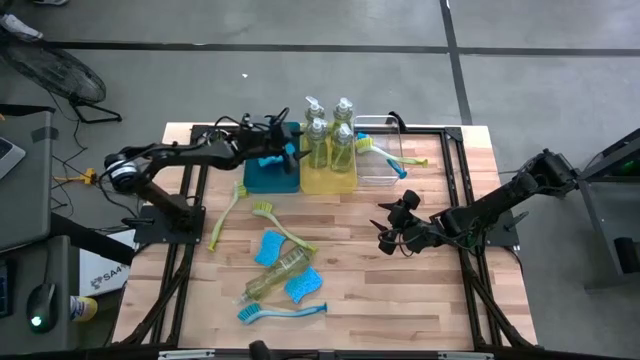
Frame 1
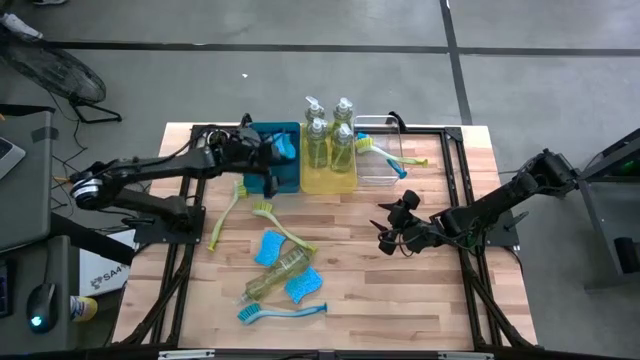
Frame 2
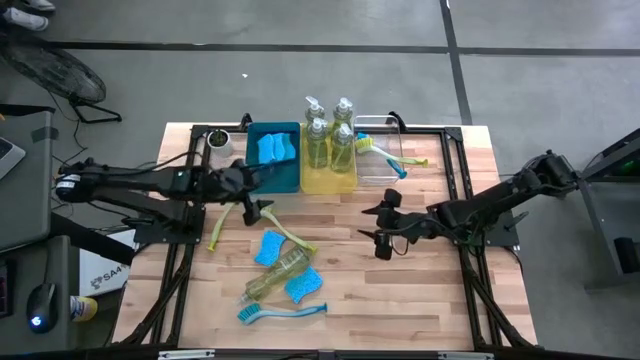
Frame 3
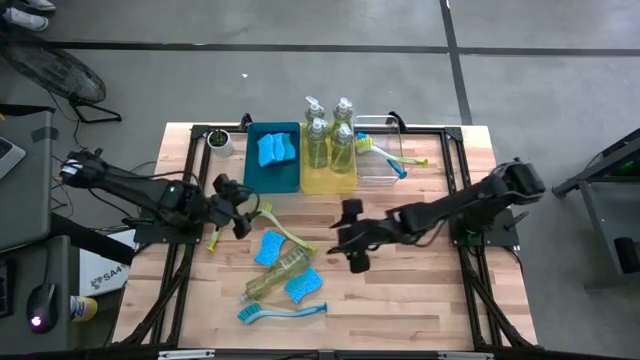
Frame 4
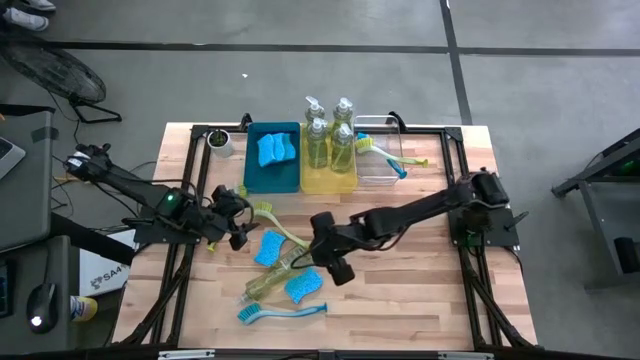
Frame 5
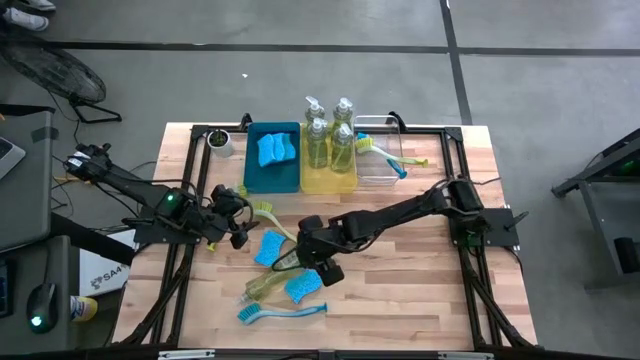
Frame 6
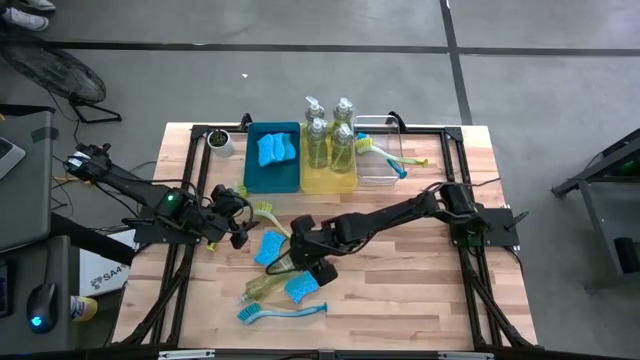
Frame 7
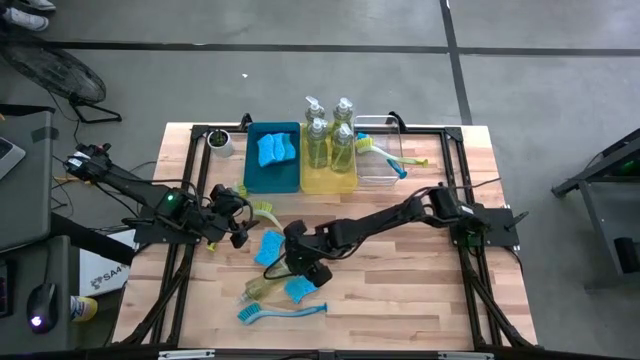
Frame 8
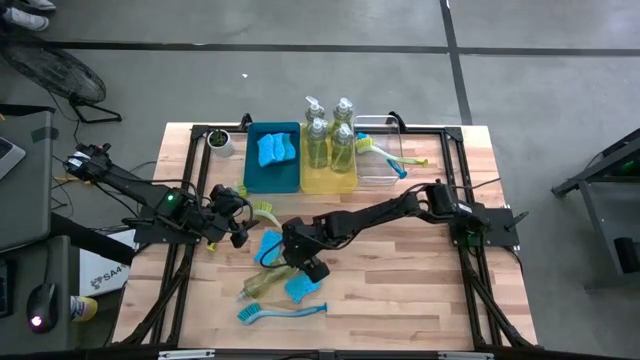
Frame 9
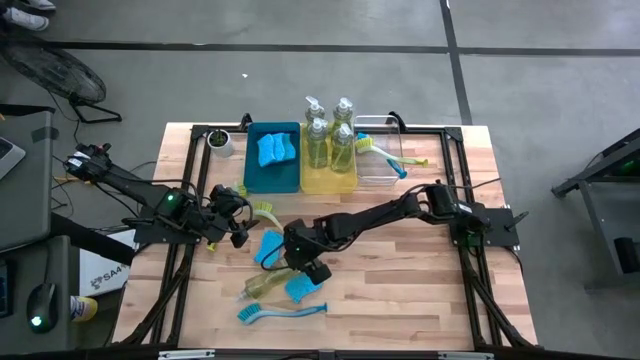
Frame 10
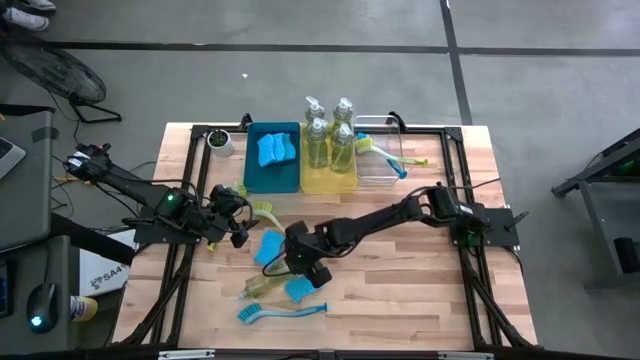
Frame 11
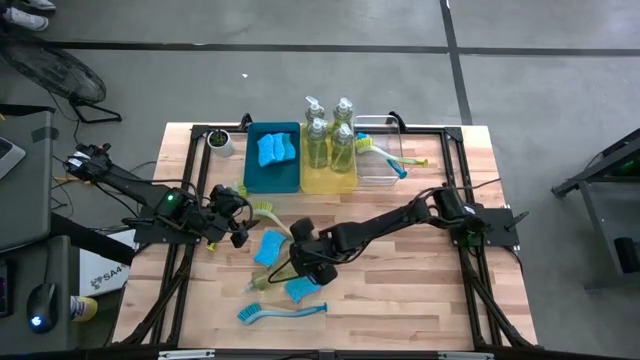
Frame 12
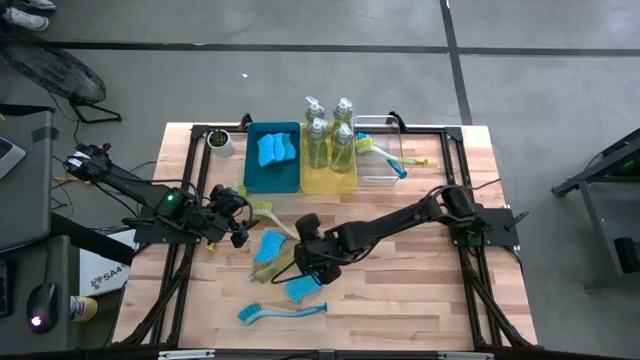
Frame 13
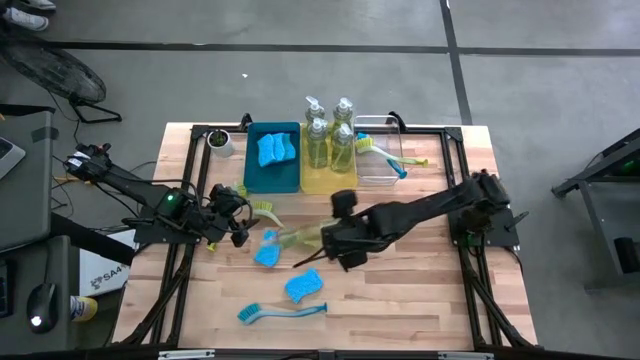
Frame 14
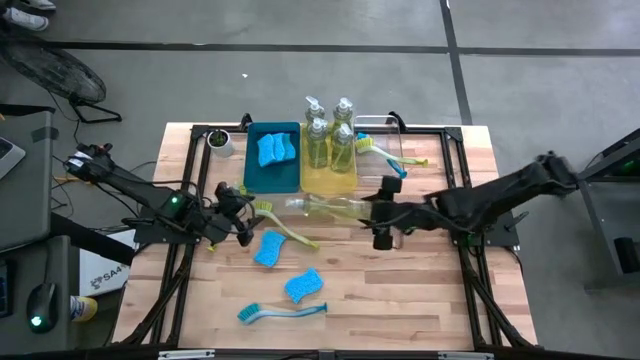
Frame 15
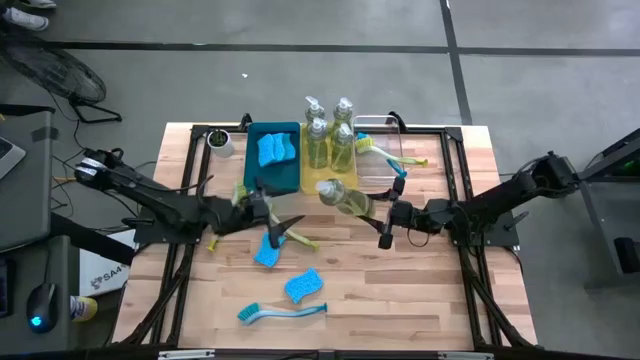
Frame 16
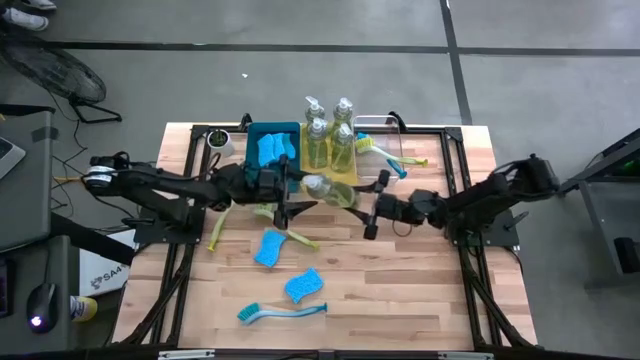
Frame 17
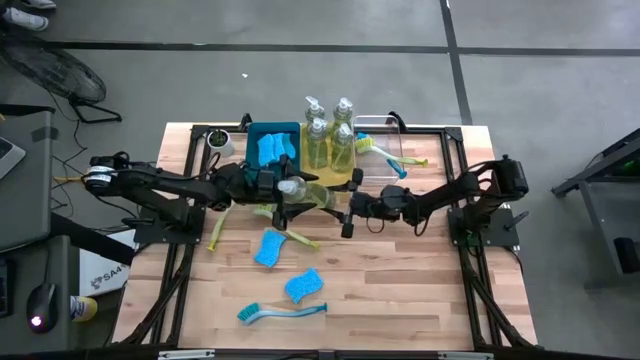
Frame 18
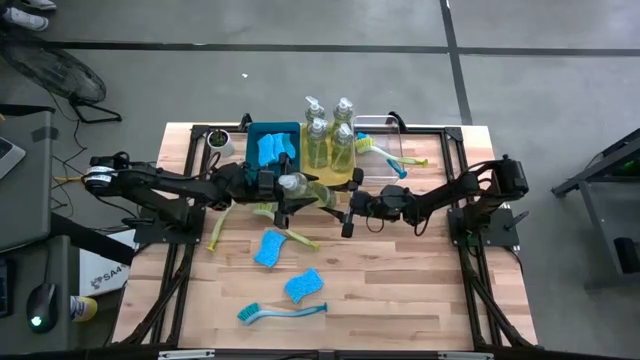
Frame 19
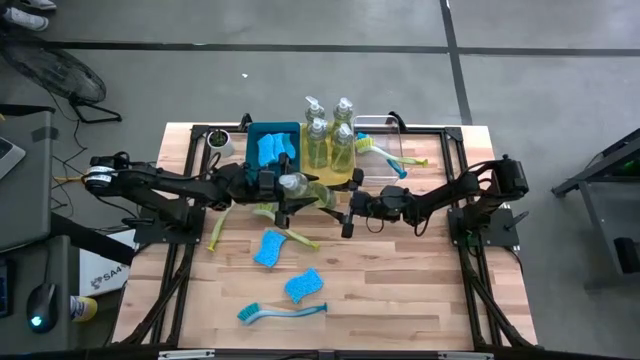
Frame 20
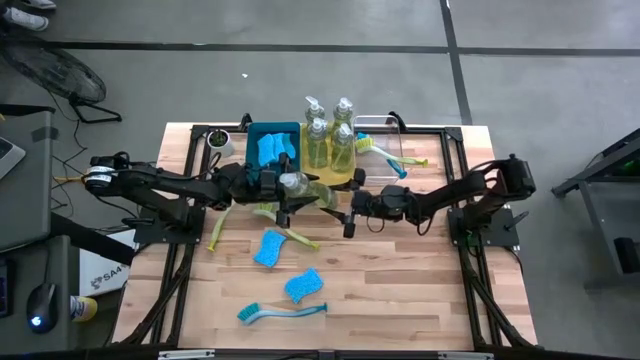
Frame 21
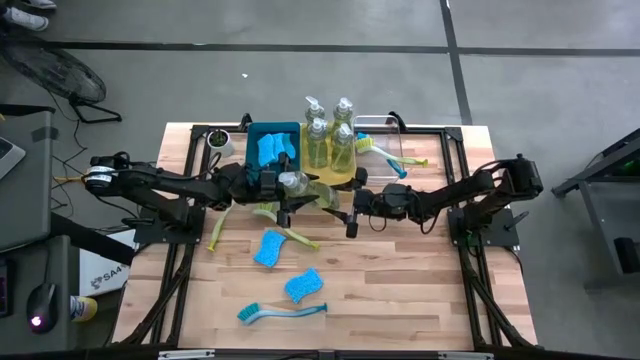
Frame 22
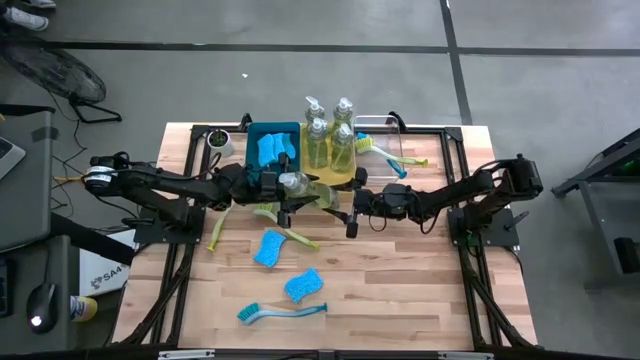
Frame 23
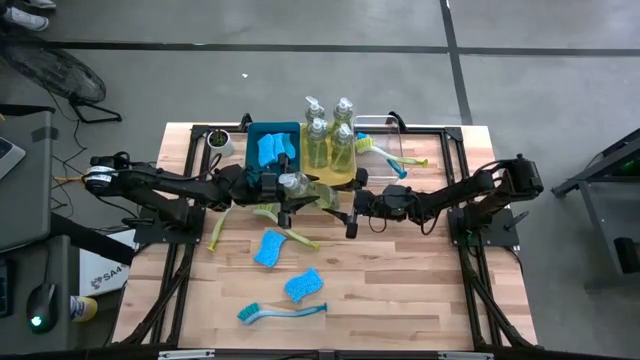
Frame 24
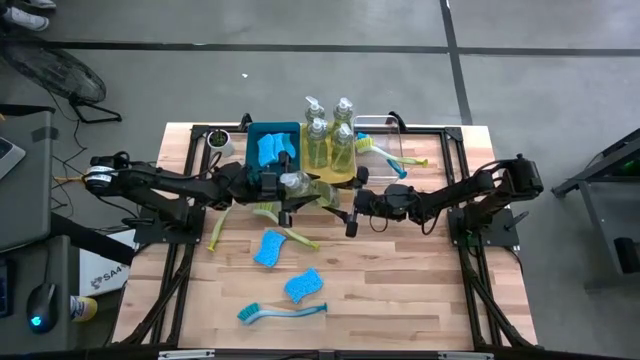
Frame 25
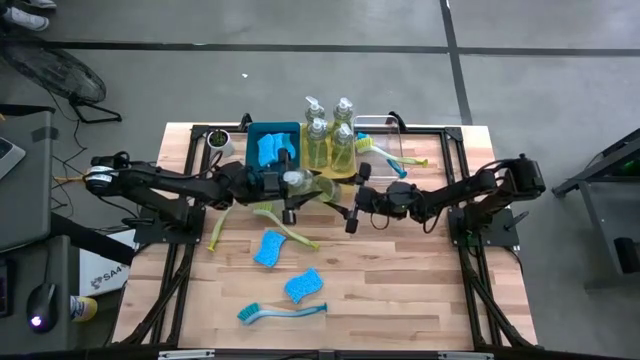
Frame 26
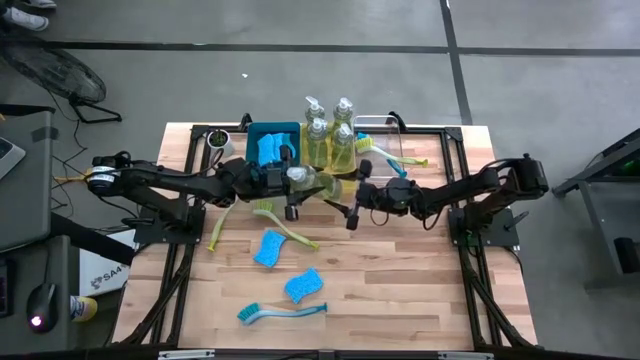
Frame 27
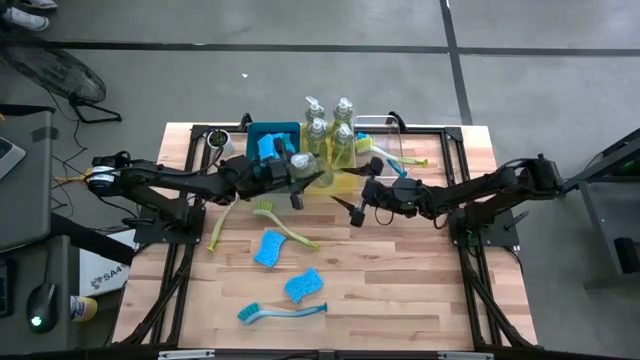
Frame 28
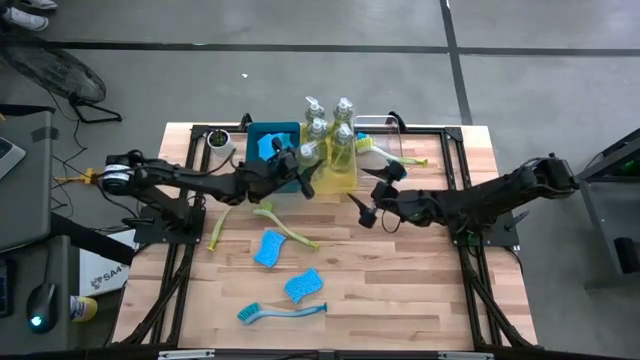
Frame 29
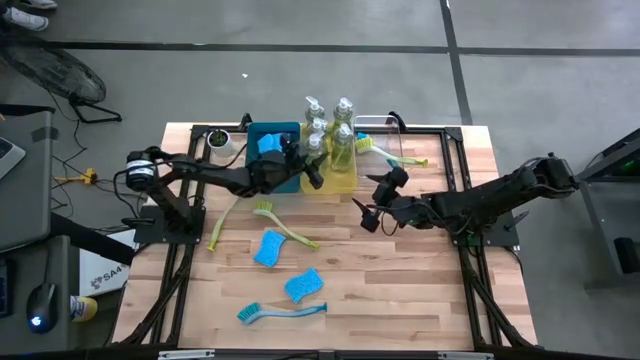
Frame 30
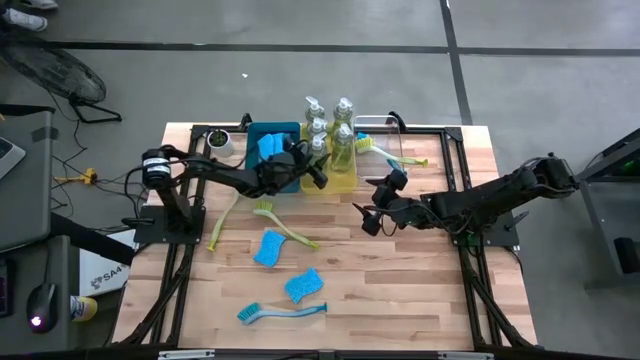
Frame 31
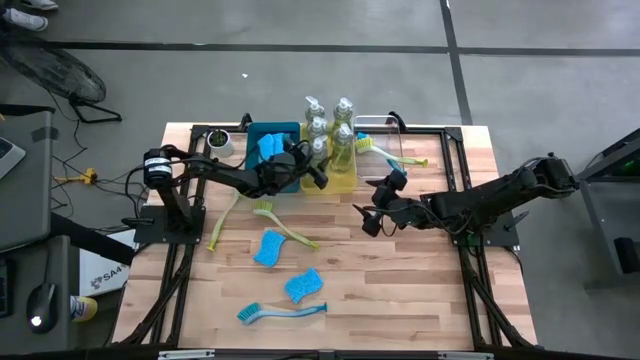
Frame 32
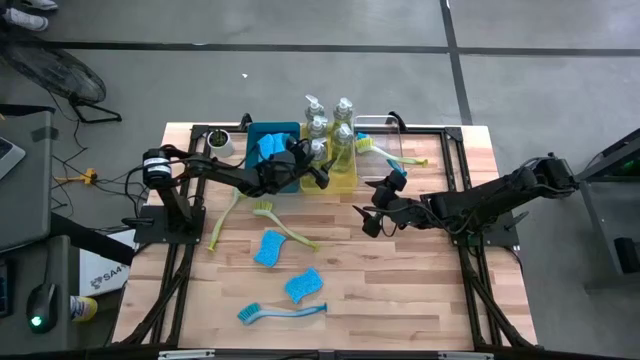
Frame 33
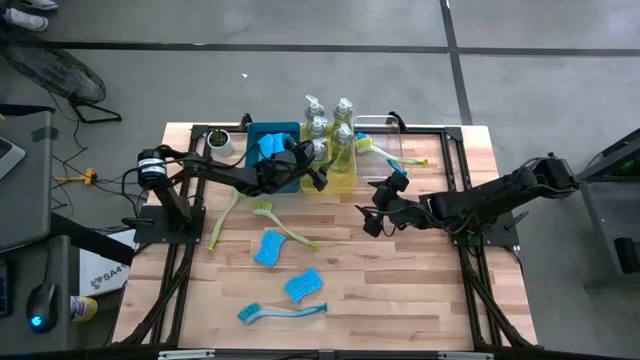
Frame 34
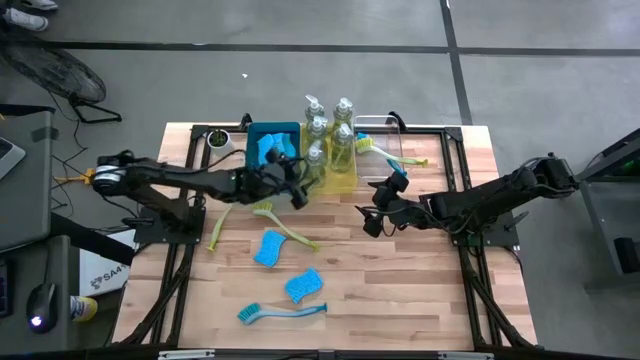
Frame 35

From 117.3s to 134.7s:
Task: Pick & Place Kitchen Sink Supplies
Put the dishwashing liquid into the yellow bin

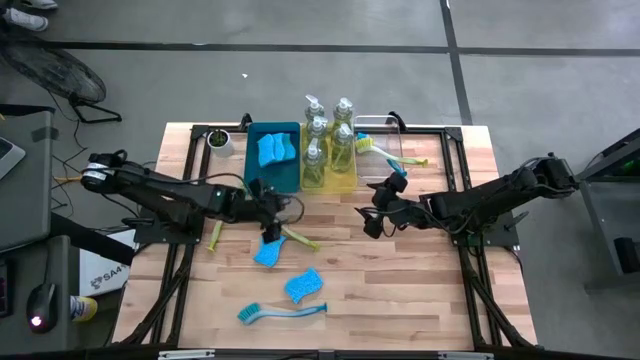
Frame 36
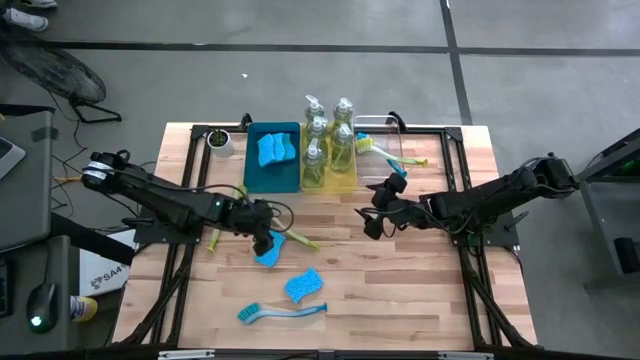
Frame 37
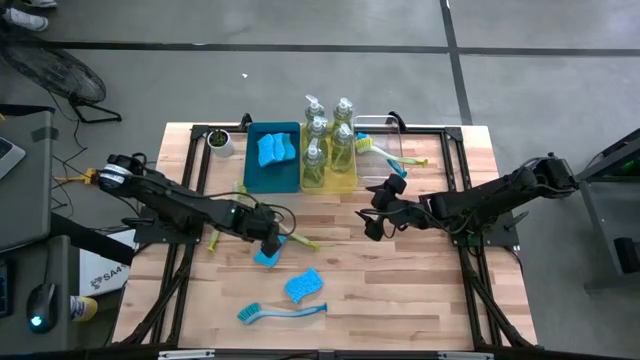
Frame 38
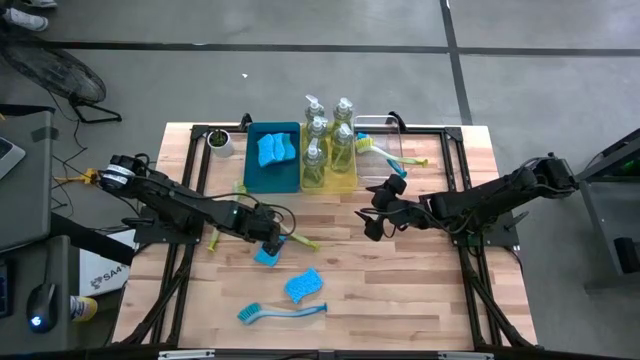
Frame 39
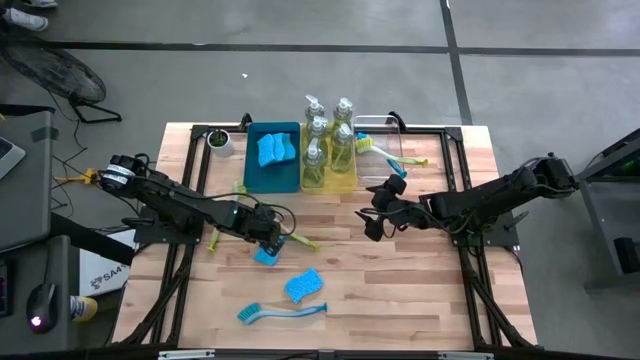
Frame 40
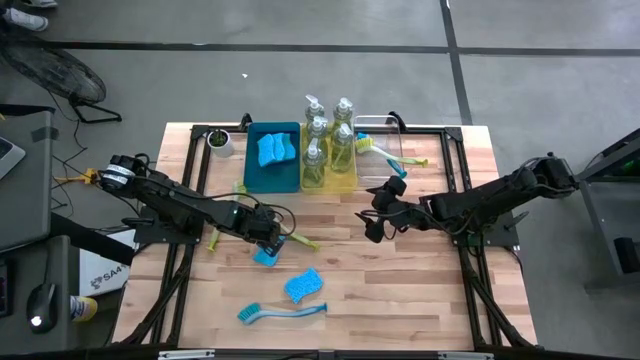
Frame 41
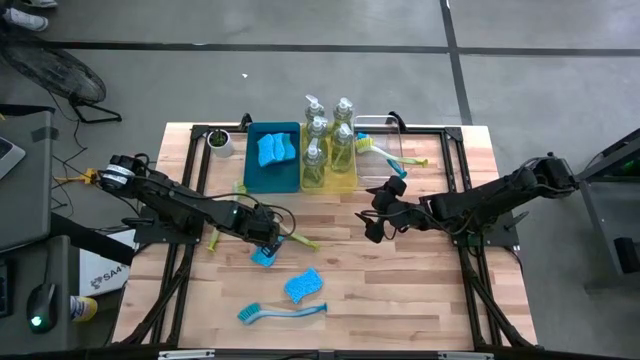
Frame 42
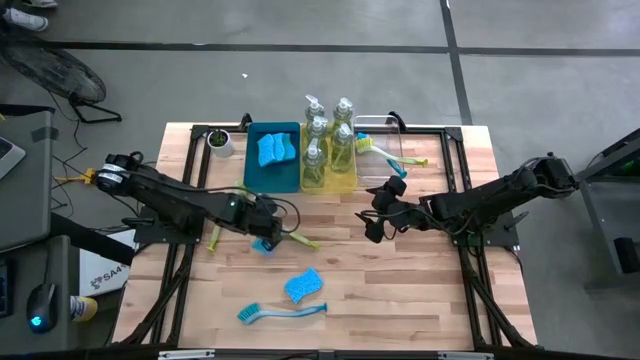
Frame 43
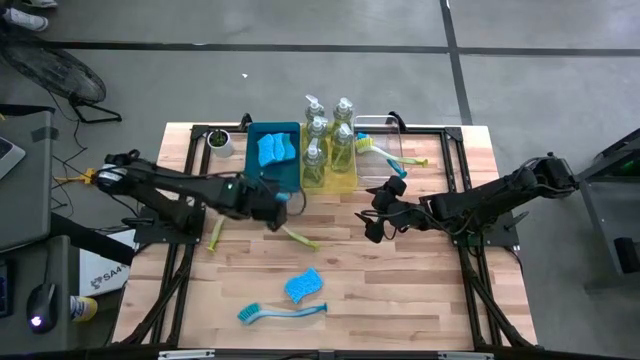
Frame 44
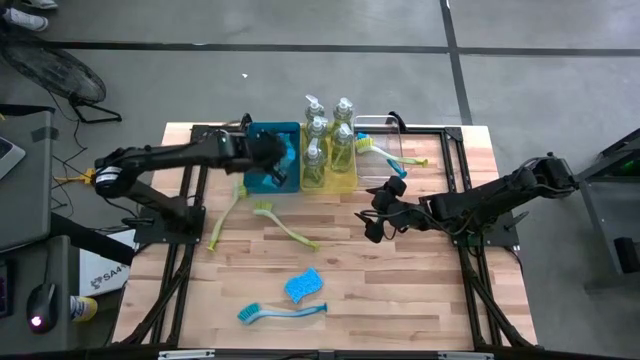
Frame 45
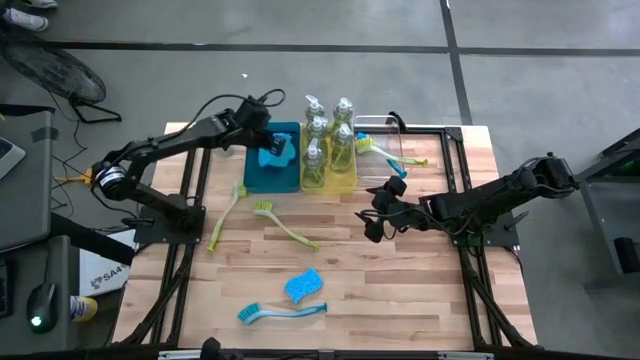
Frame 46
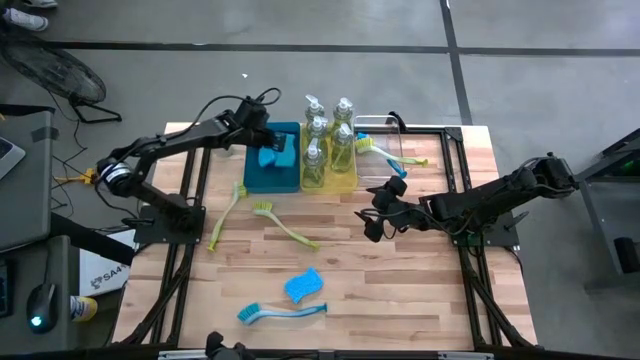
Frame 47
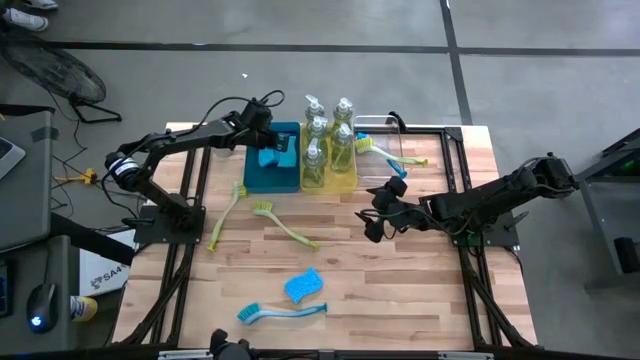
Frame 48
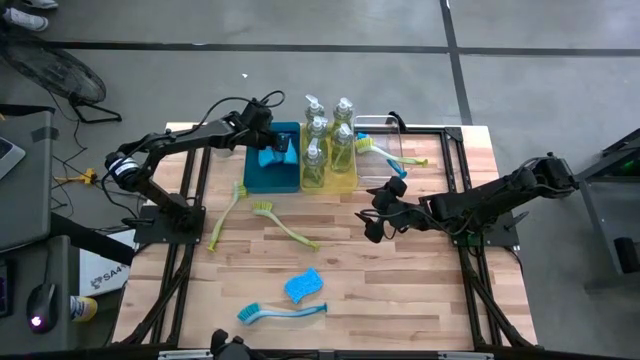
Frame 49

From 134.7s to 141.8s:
Put the blue sponge into the blue bin
